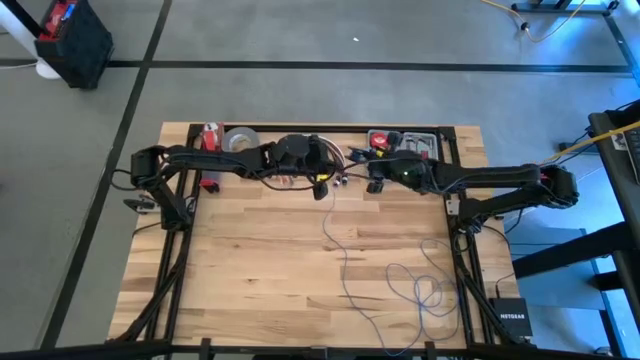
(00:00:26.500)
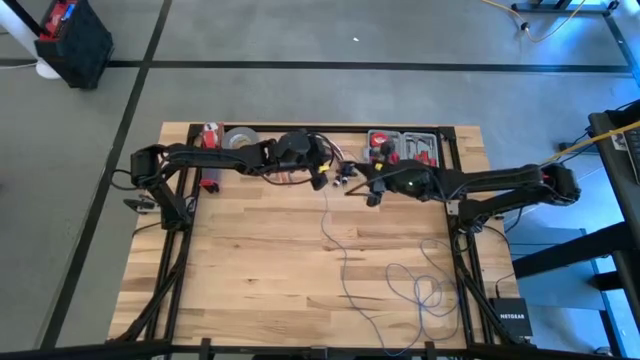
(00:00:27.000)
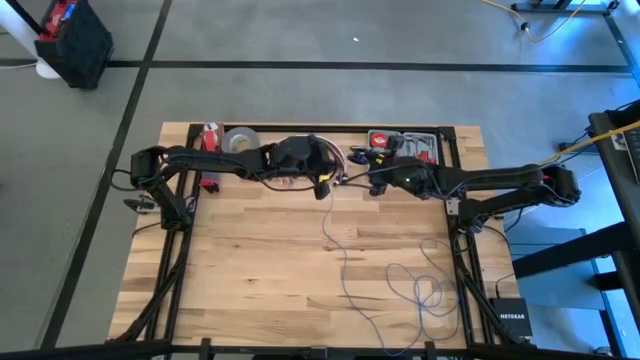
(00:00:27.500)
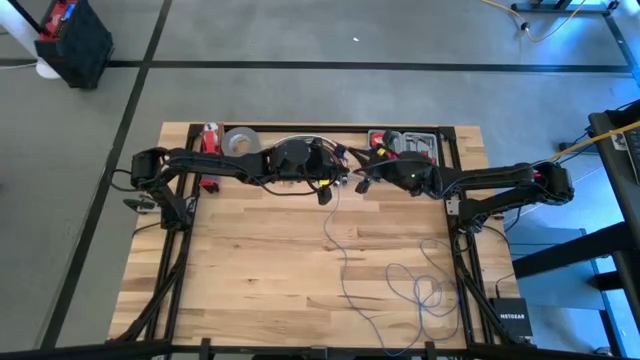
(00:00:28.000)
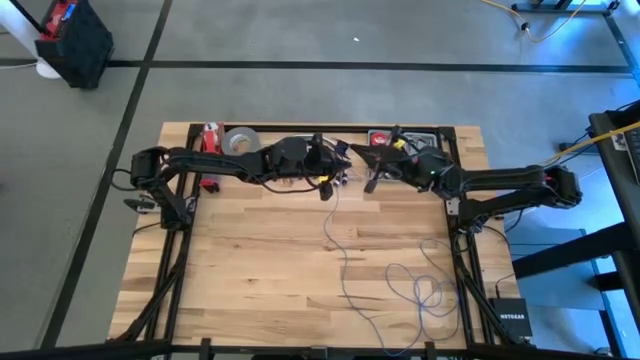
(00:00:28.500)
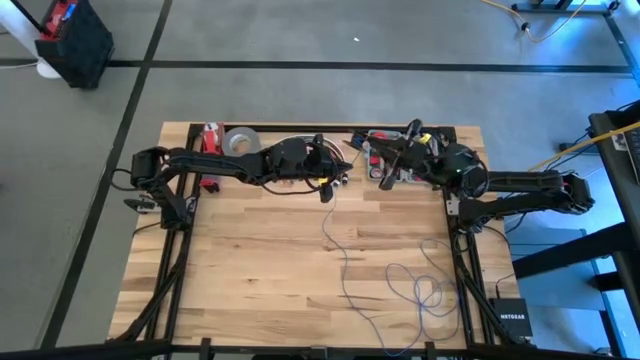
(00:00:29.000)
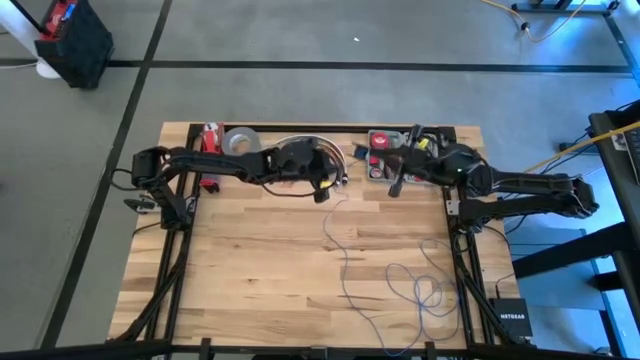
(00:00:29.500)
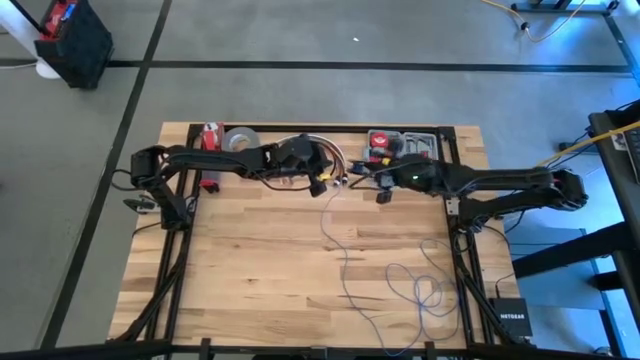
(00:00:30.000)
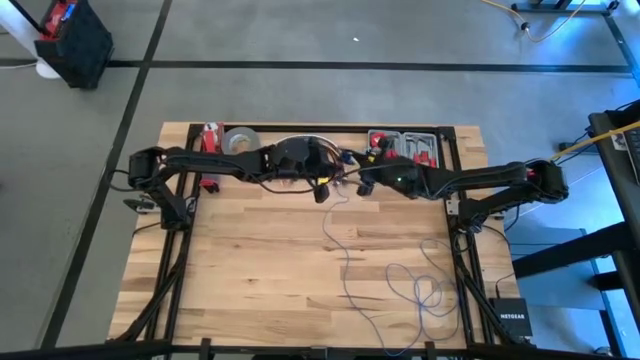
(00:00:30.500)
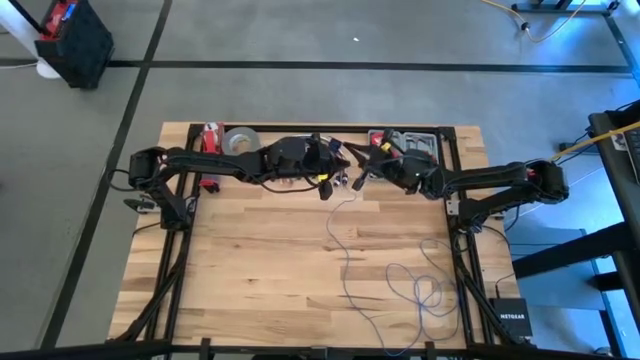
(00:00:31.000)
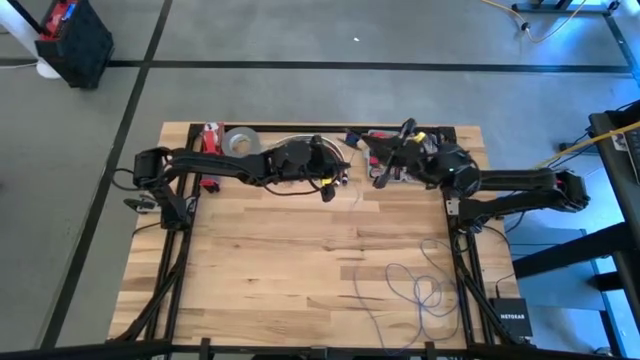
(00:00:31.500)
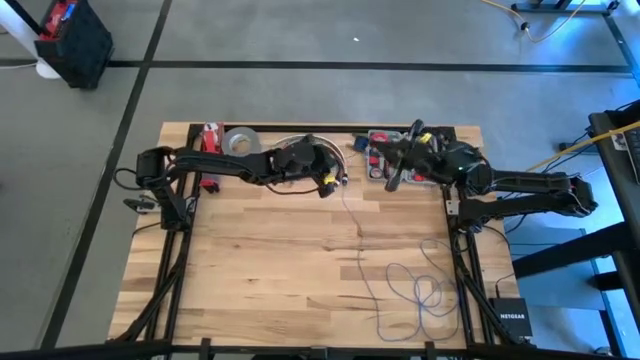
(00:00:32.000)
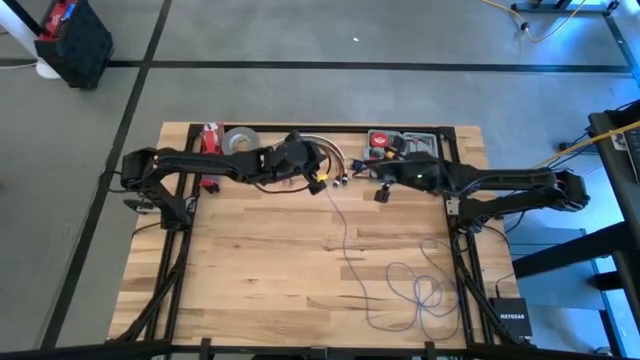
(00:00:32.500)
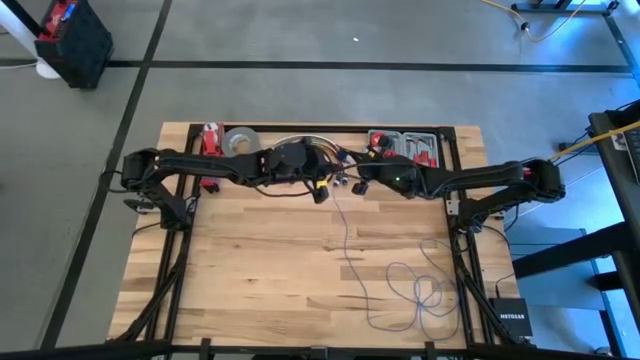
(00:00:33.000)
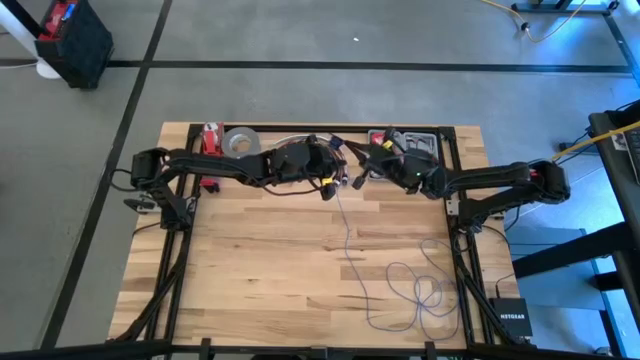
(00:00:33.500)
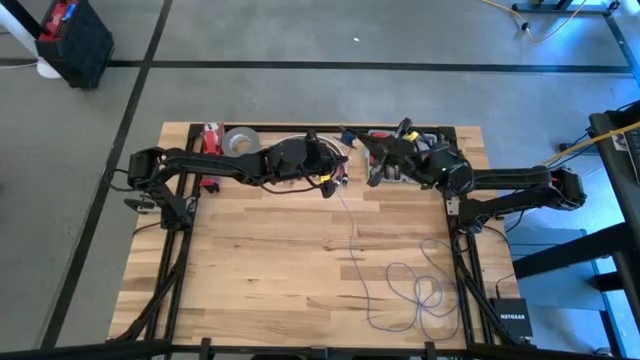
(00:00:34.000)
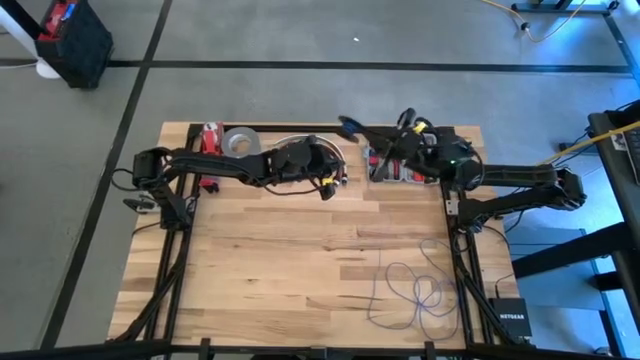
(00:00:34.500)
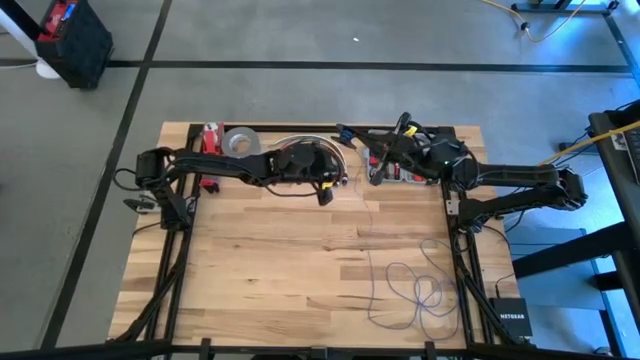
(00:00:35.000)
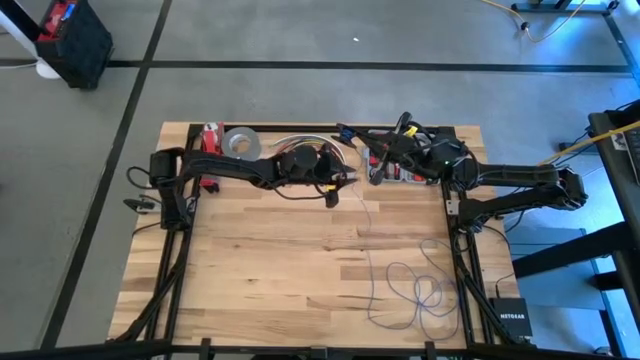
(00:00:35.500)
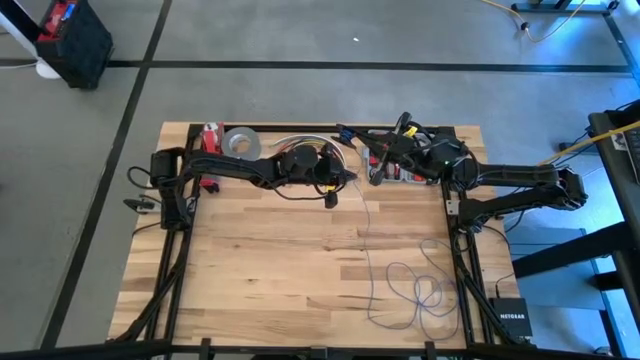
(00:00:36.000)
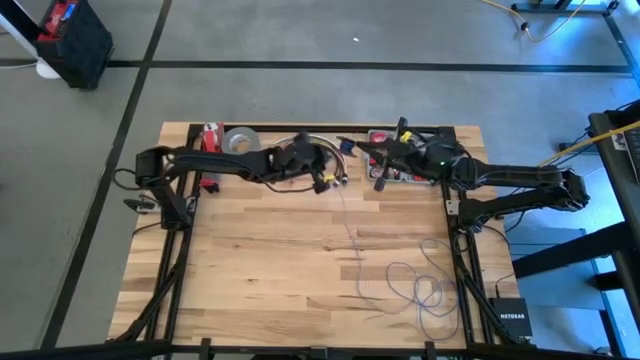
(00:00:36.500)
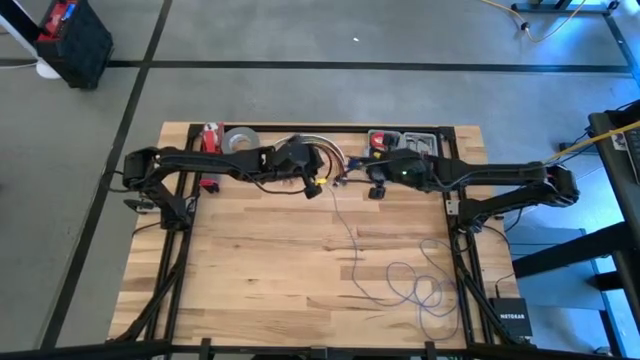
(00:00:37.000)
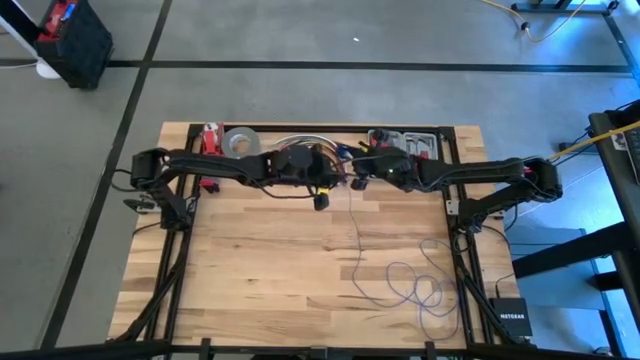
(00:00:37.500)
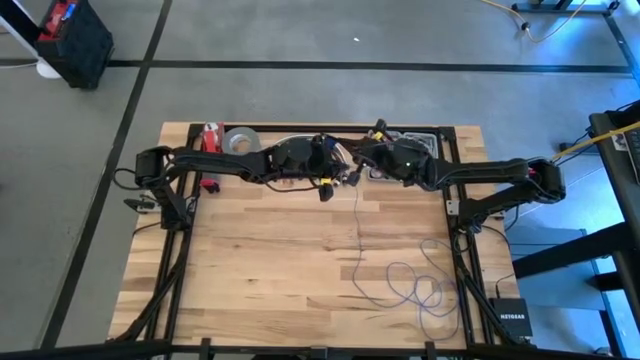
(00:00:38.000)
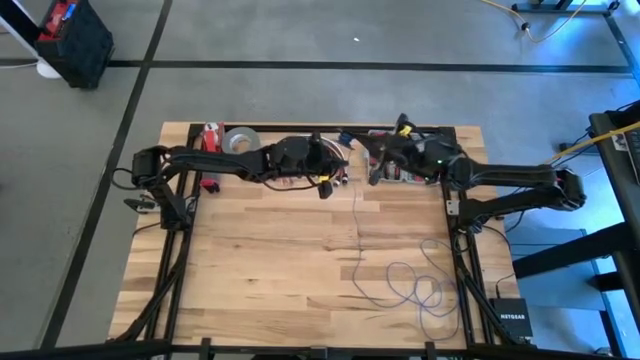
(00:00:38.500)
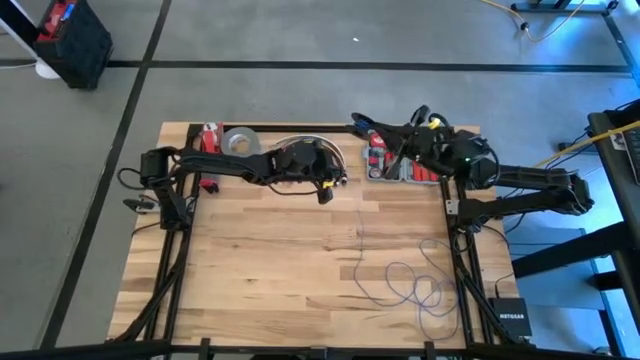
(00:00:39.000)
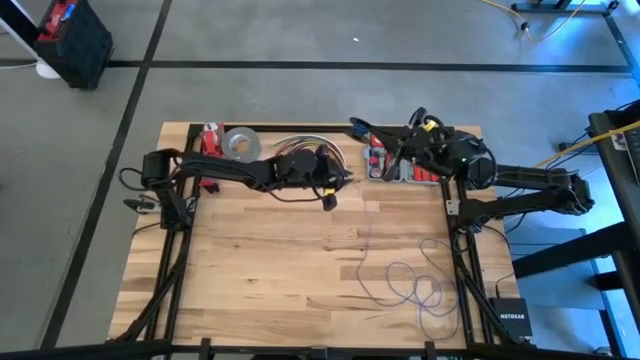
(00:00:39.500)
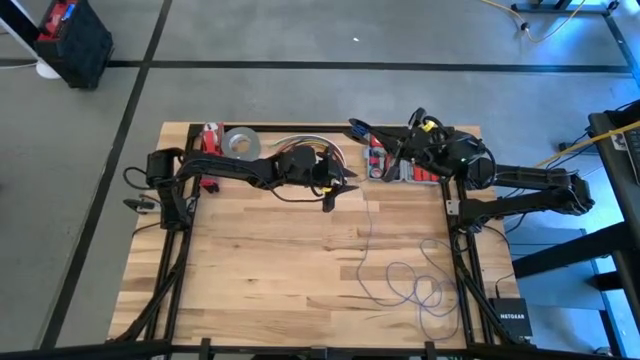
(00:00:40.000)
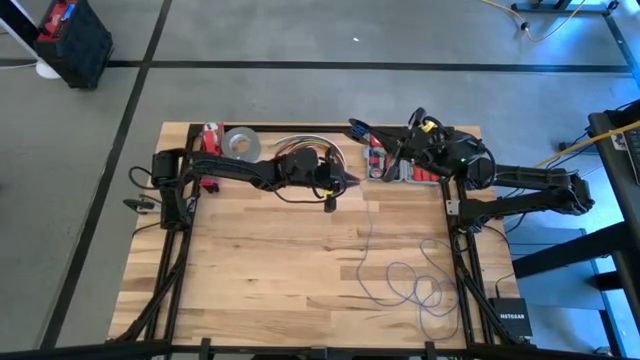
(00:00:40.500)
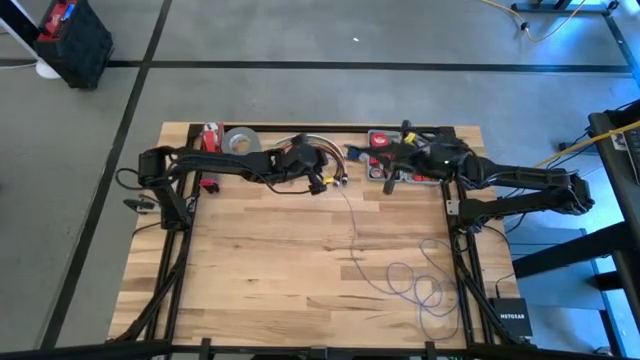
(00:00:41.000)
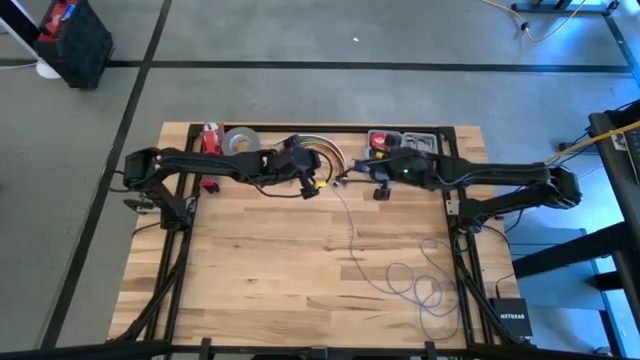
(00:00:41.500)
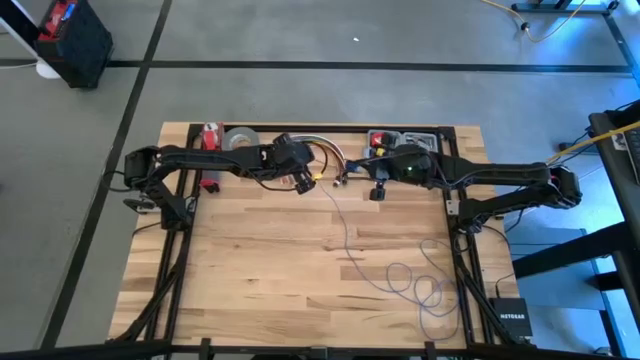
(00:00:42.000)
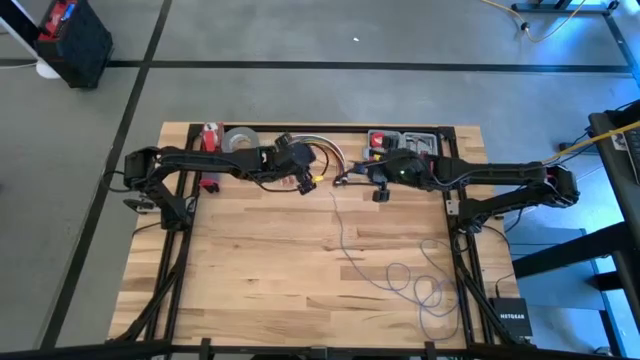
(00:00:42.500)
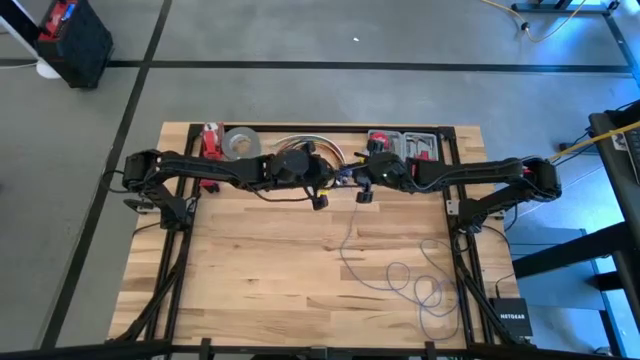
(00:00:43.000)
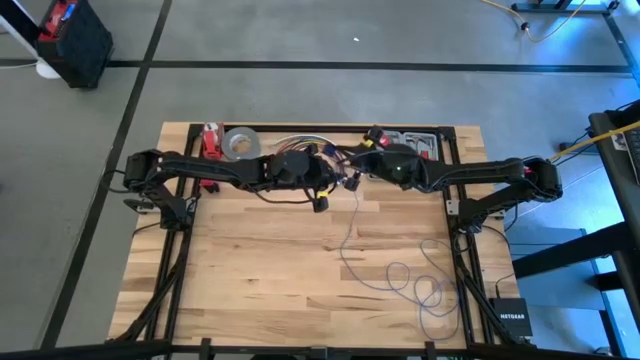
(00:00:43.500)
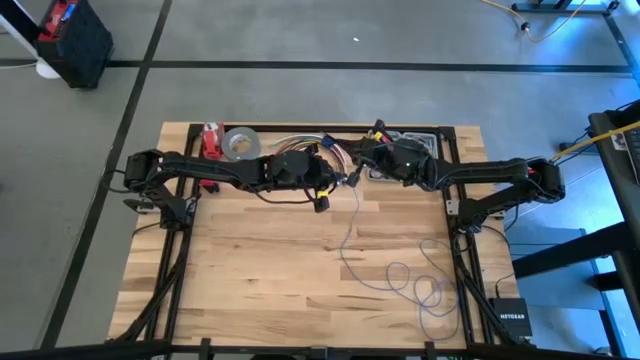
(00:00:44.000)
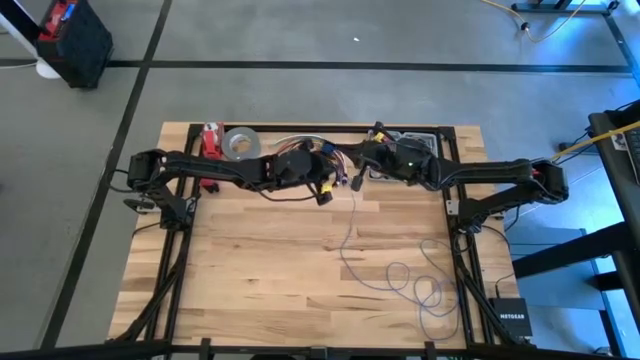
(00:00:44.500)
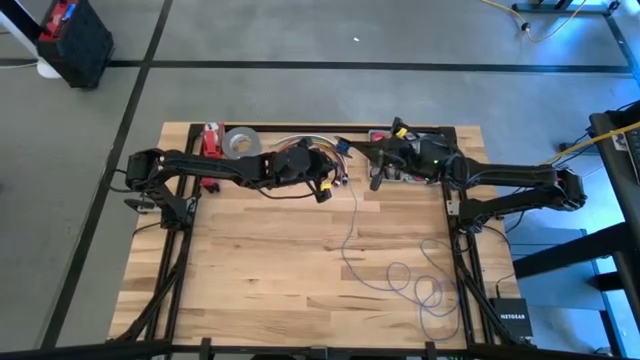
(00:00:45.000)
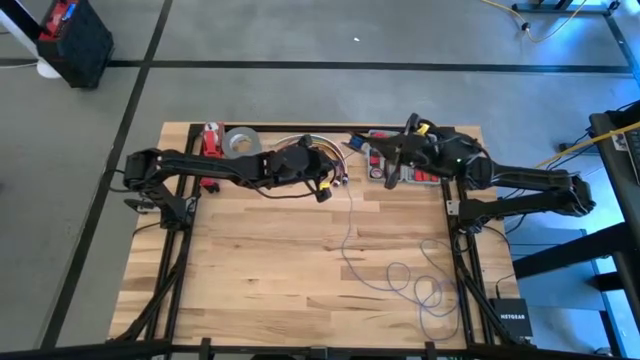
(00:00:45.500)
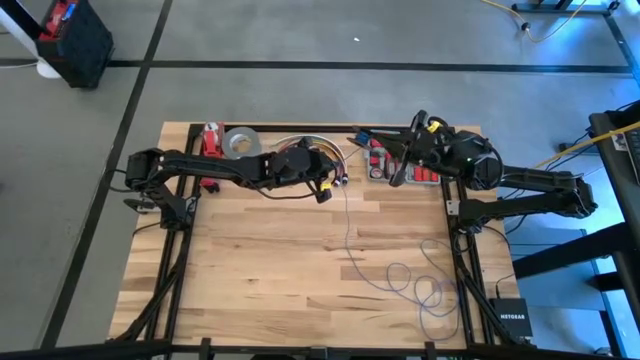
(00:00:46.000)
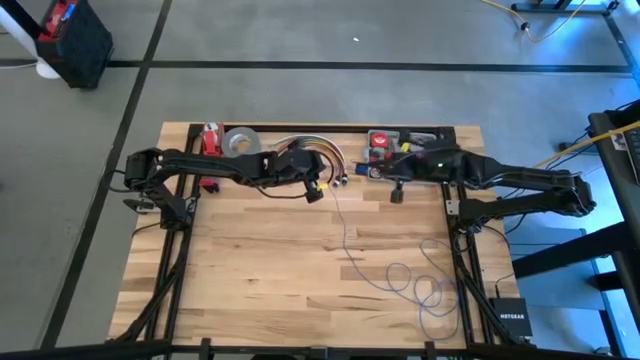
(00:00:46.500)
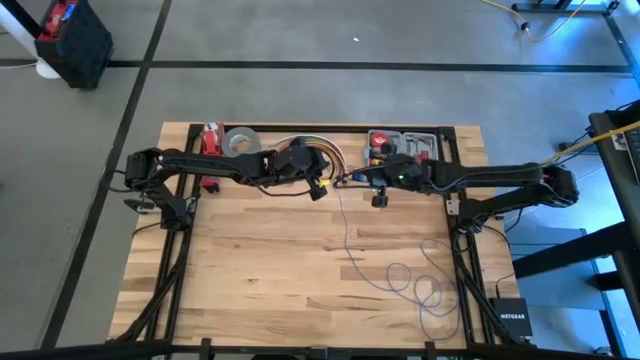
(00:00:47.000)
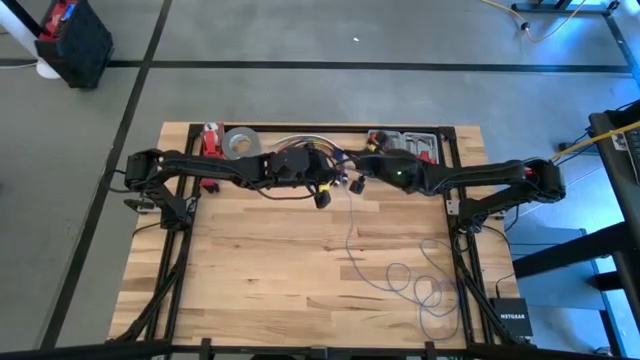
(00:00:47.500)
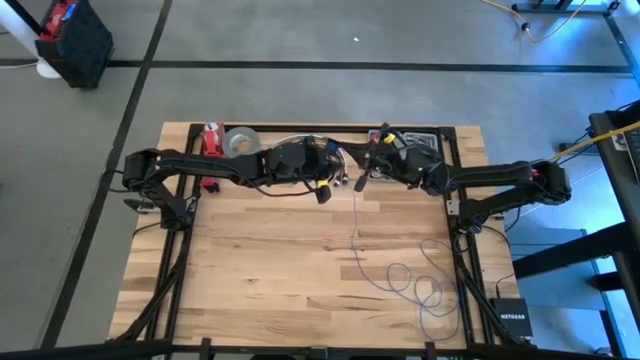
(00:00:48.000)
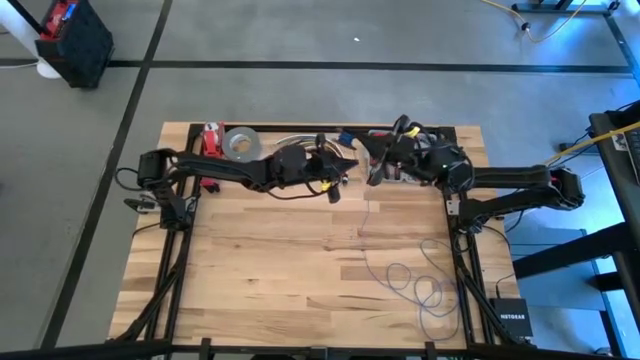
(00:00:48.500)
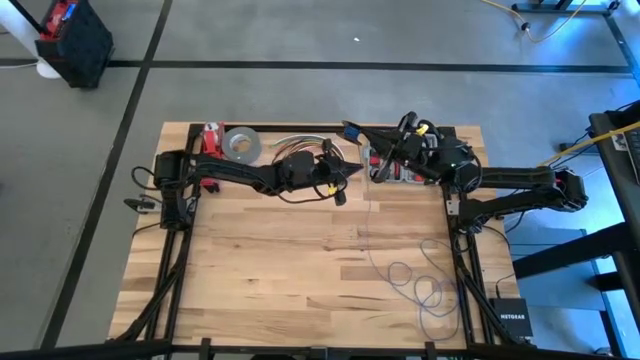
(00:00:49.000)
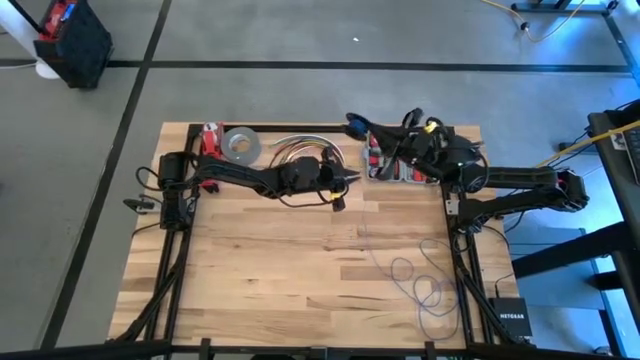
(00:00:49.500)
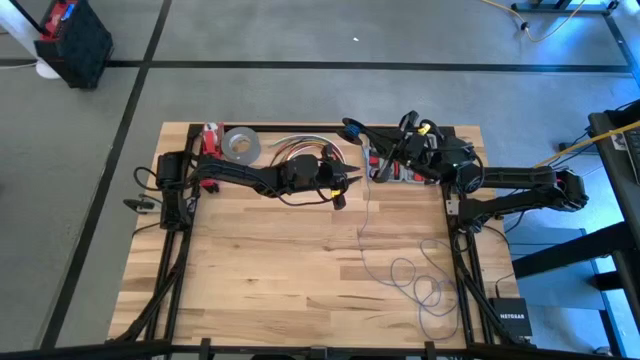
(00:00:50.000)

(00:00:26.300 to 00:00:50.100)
Task: Coil cords
Coil the blue wire on the black spool
